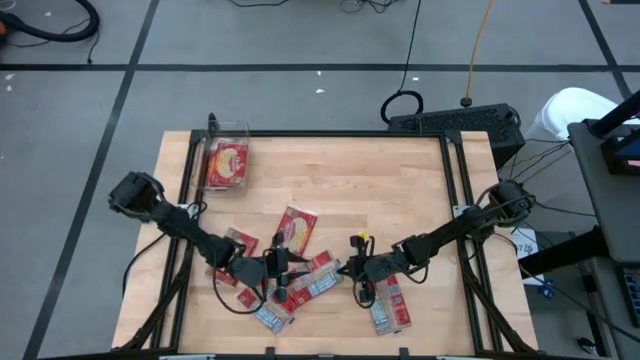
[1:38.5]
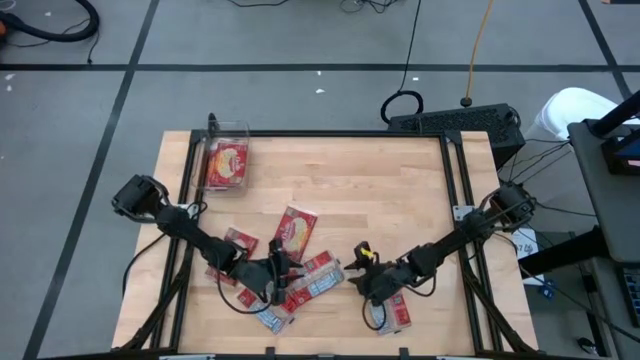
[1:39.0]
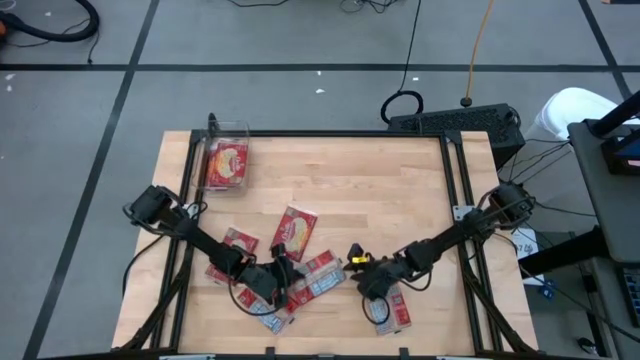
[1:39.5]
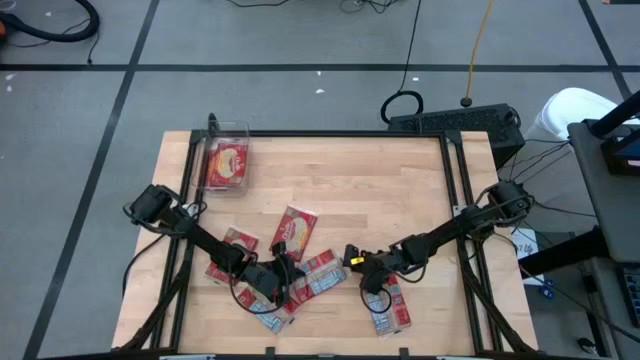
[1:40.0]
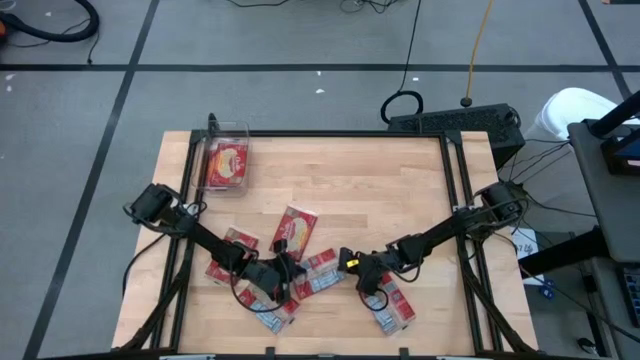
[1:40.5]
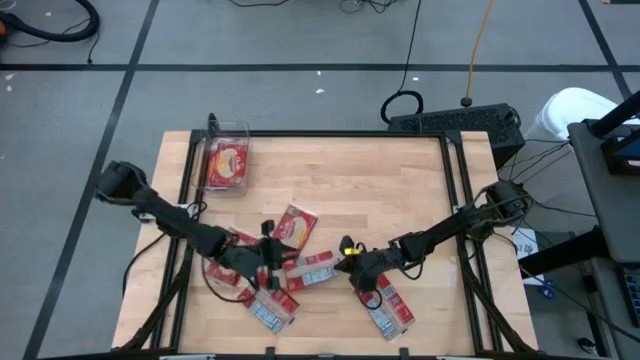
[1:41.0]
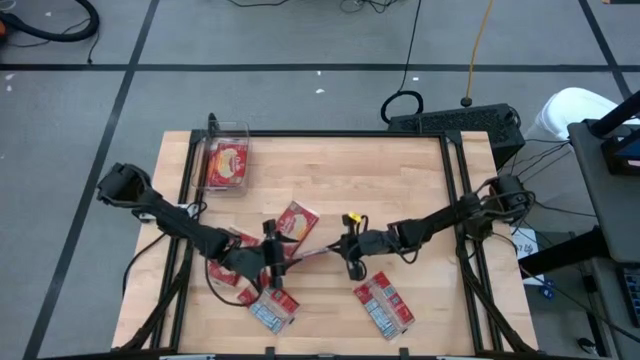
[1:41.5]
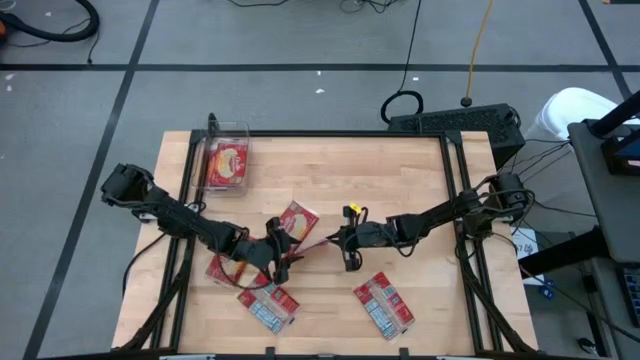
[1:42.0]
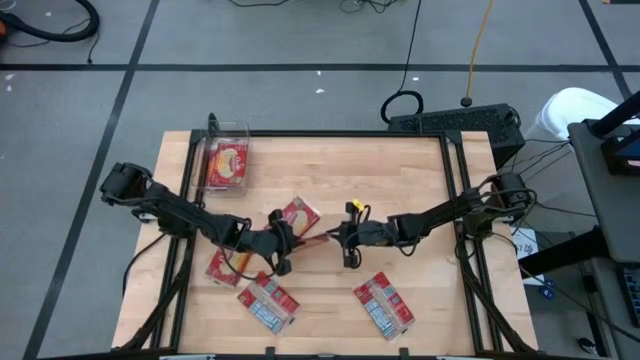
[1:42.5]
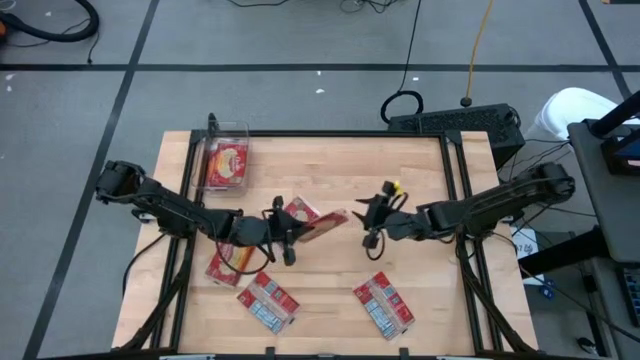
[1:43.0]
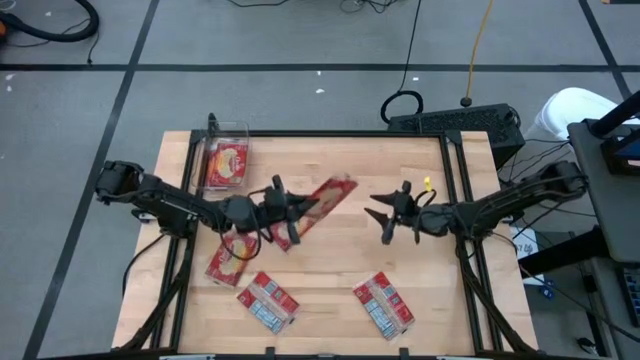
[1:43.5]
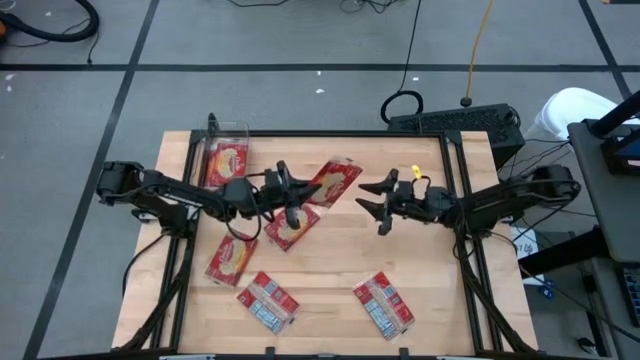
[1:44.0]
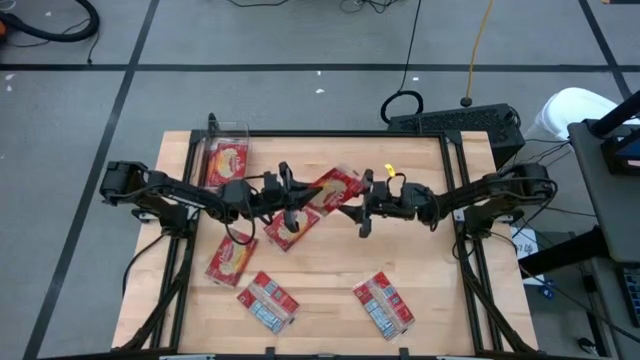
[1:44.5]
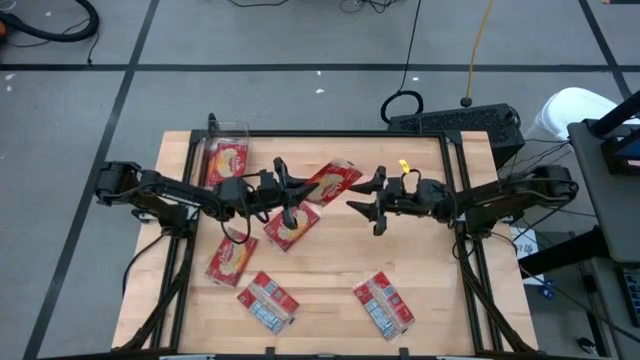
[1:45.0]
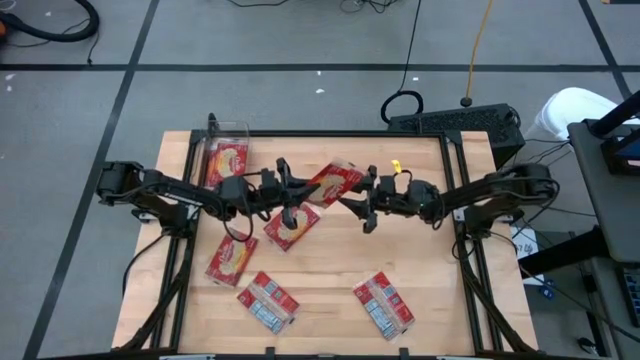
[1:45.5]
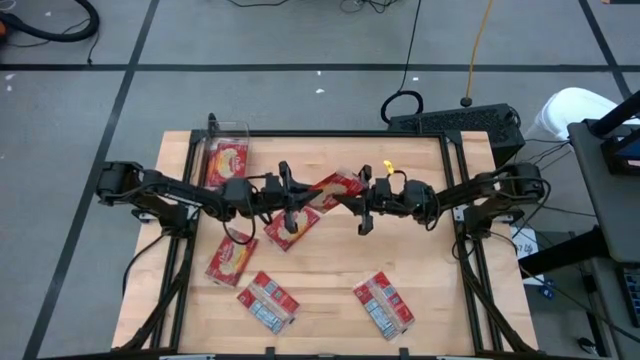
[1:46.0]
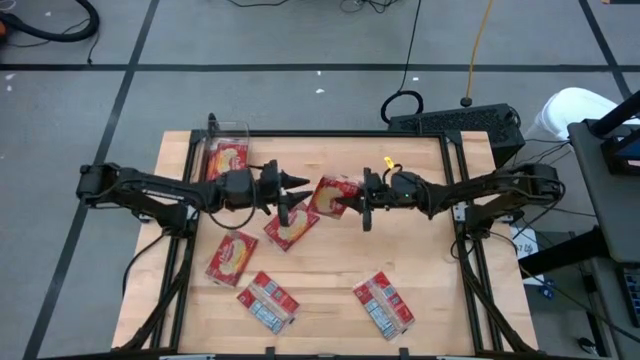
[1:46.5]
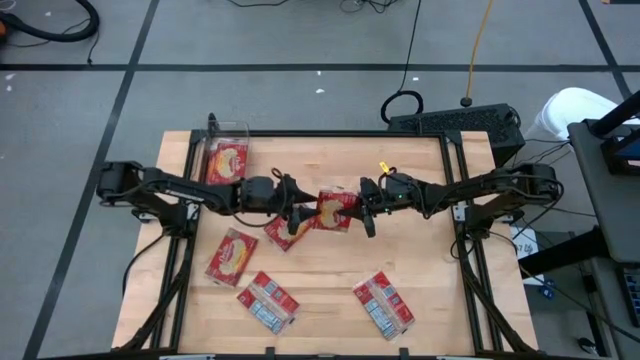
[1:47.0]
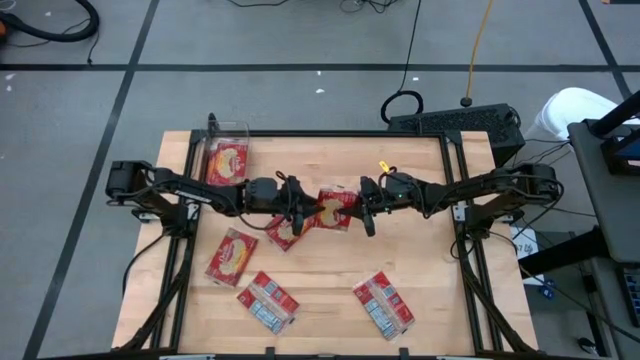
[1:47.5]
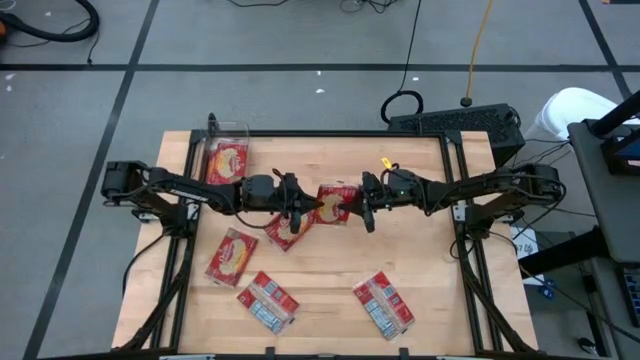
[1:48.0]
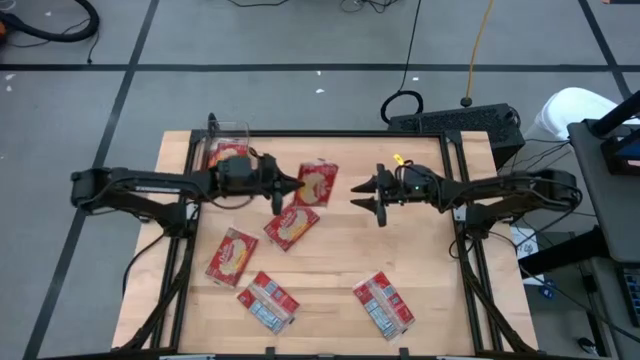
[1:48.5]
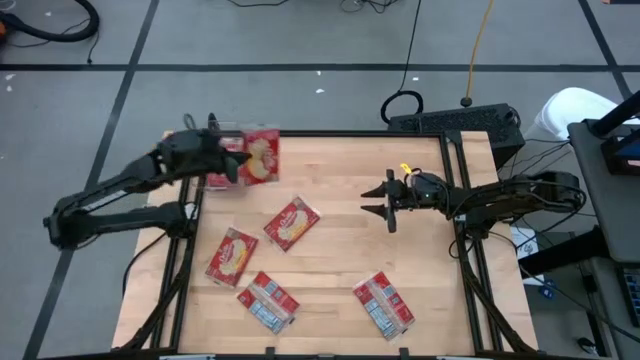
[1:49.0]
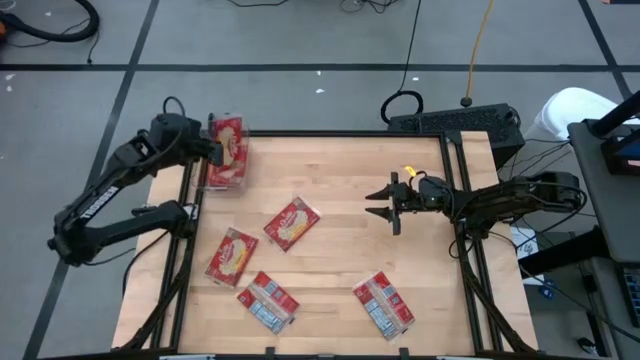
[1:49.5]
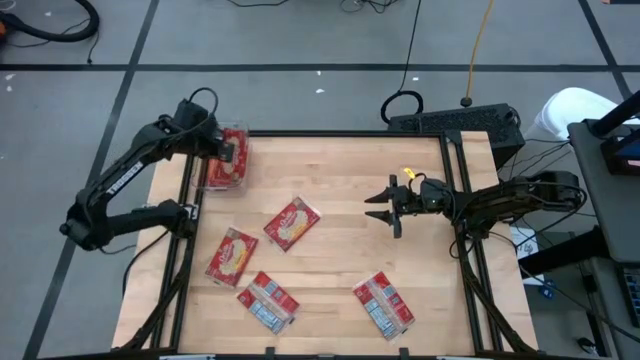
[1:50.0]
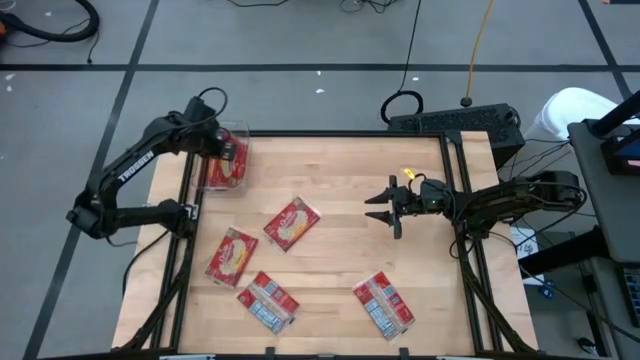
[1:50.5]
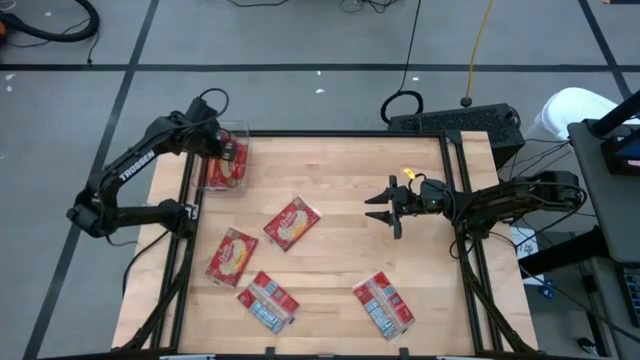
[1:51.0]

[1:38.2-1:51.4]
Task: Sort popcorn bags into baskets
Put the red popcorn bag into the transparent bin

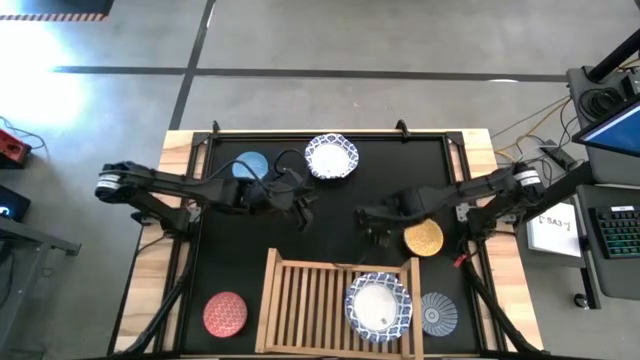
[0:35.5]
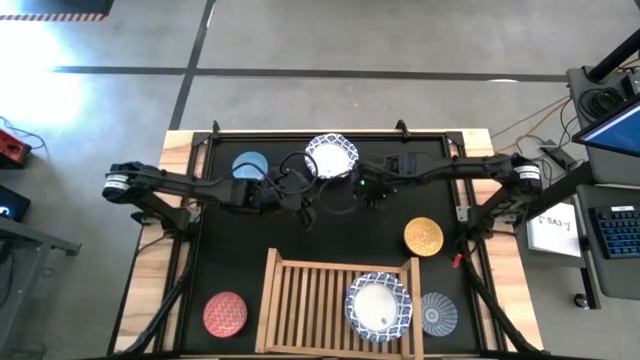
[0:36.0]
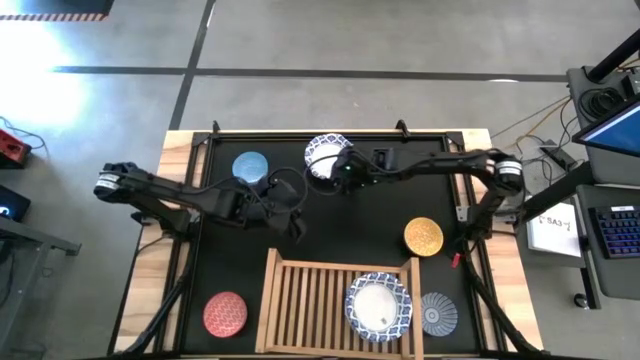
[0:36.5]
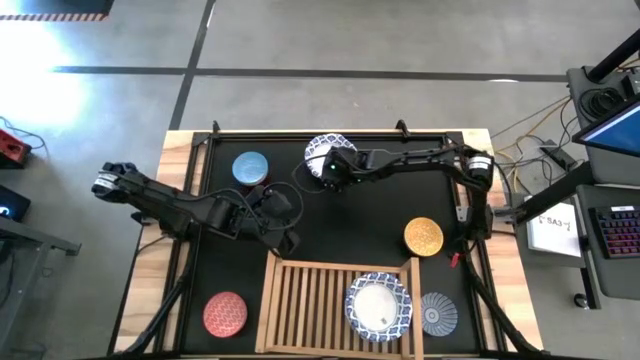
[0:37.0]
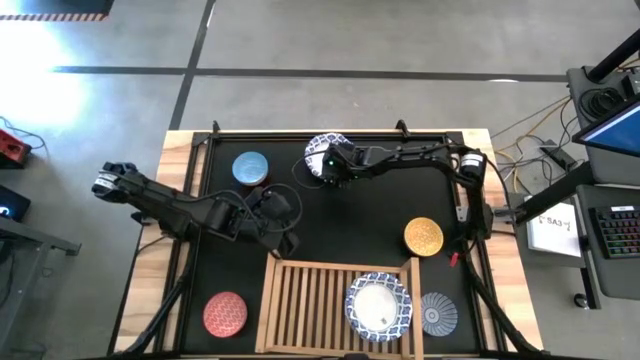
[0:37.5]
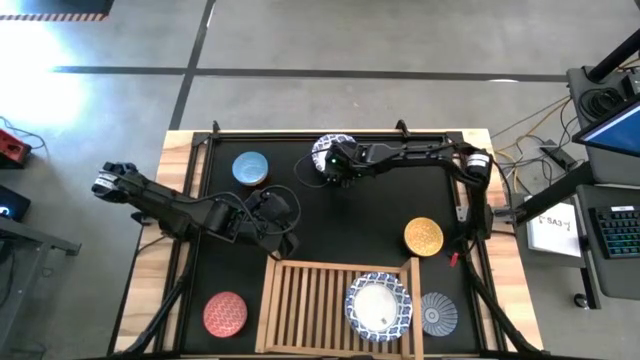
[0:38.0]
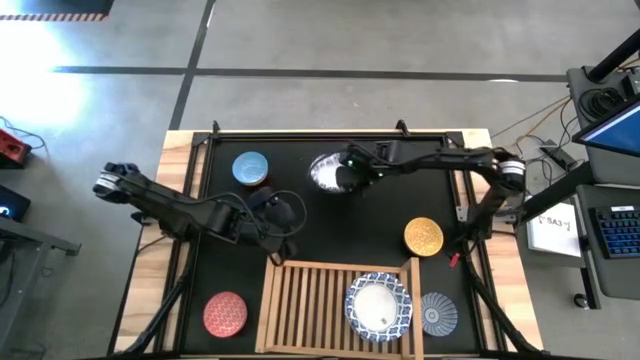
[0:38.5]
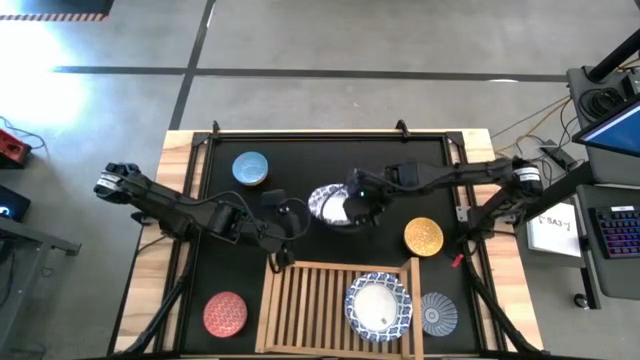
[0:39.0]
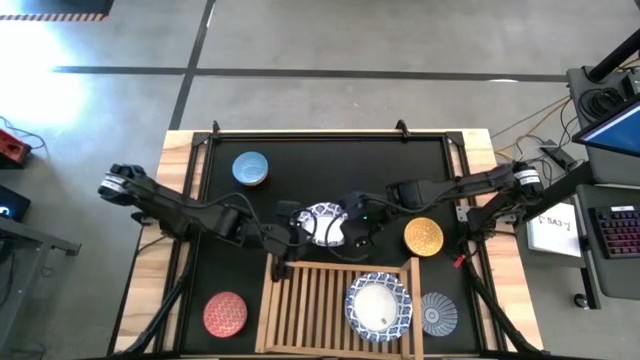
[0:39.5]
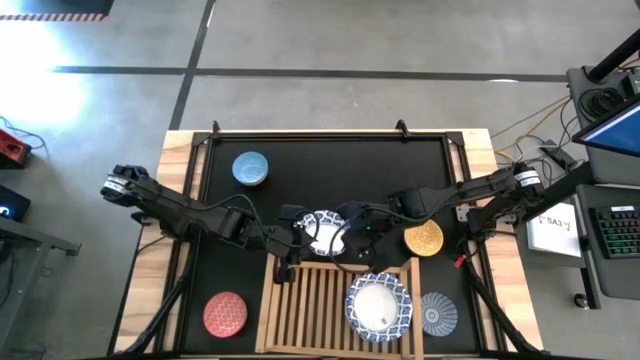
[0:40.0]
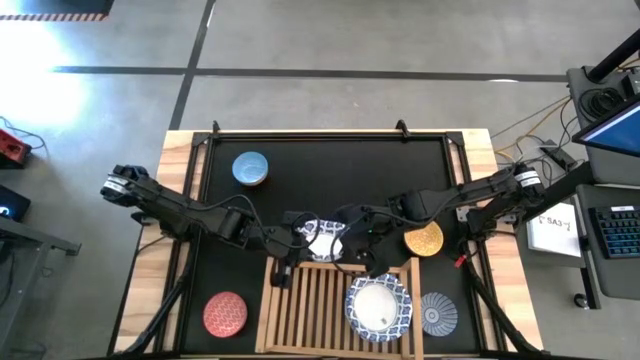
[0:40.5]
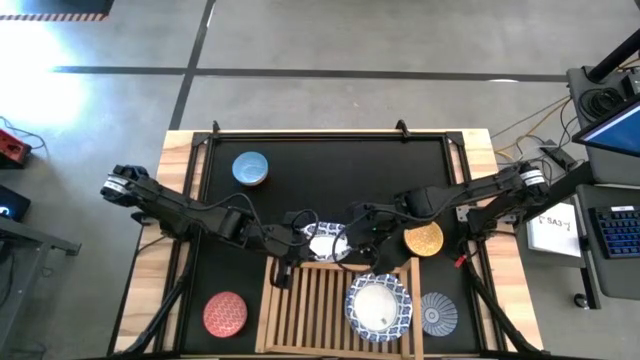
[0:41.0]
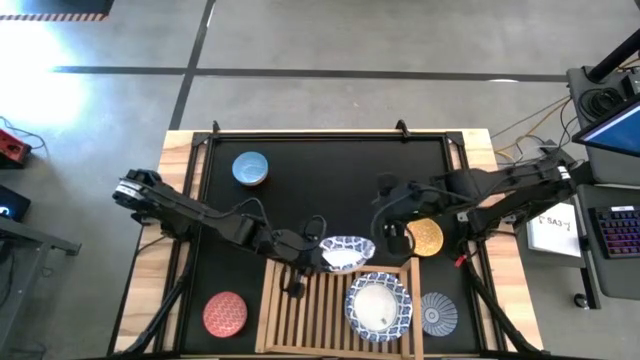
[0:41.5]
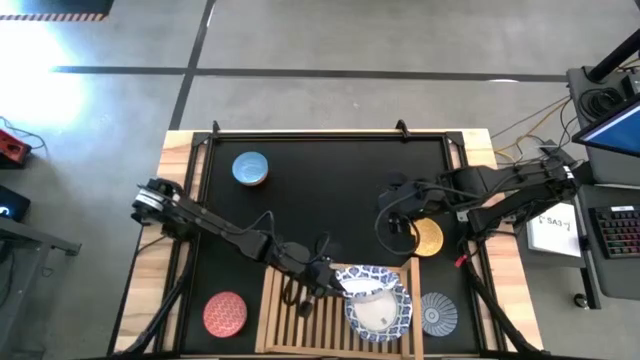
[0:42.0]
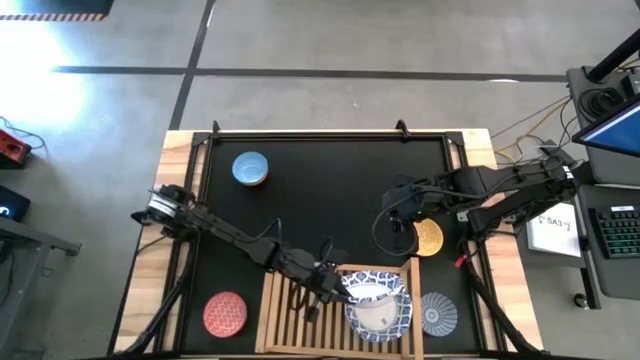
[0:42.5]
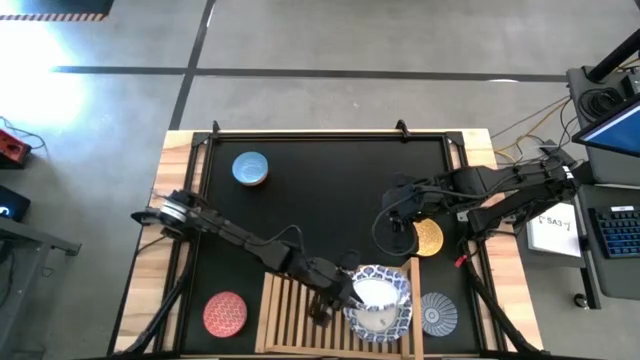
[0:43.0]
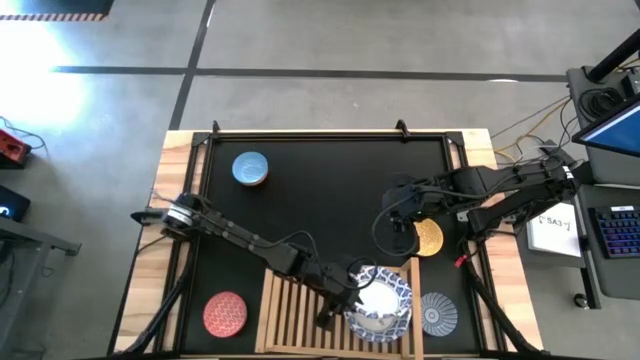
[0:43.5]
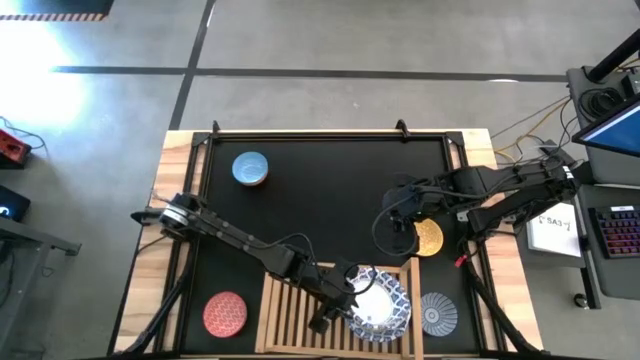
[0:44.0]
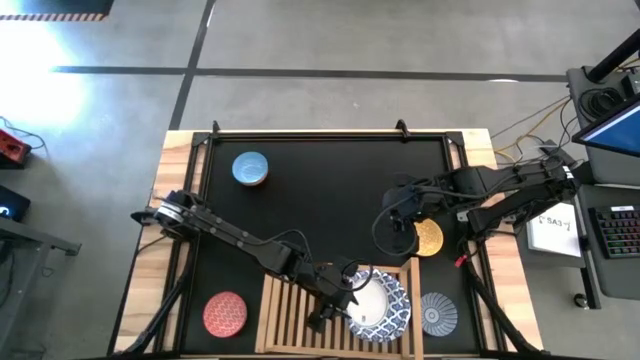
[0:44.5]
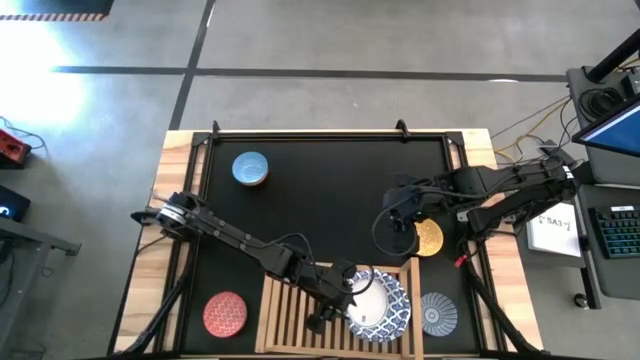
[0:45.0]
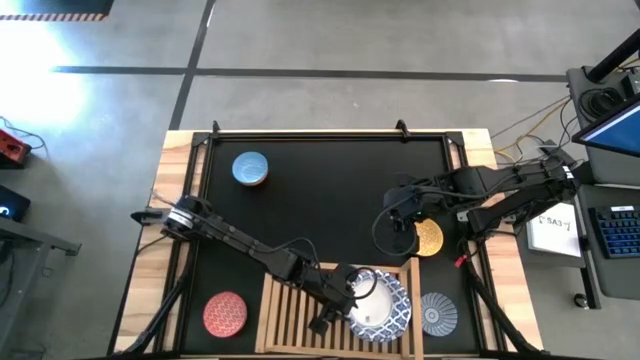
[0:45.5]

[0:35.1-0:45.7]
Task: Place and stack bowls onto a shelf
Stack the white patterned bowl on top of the white patterned bowl on the shelf
